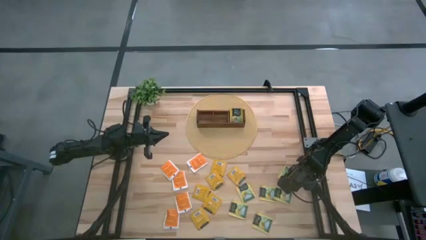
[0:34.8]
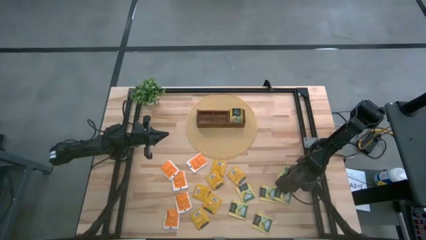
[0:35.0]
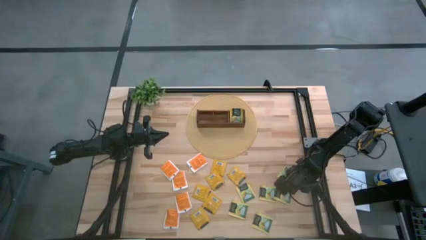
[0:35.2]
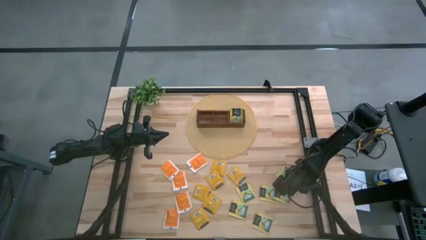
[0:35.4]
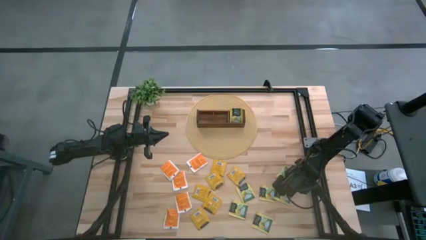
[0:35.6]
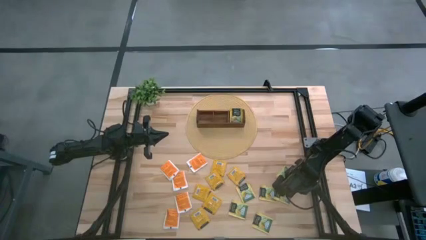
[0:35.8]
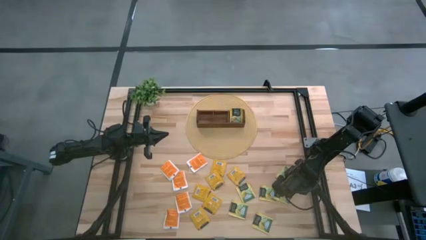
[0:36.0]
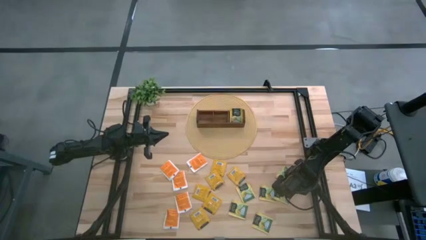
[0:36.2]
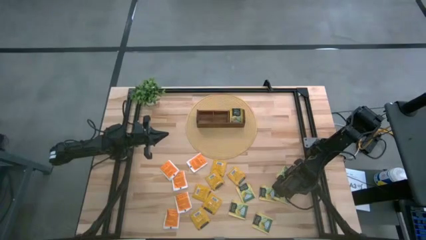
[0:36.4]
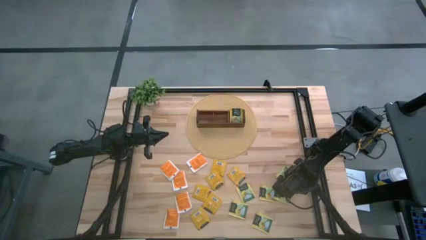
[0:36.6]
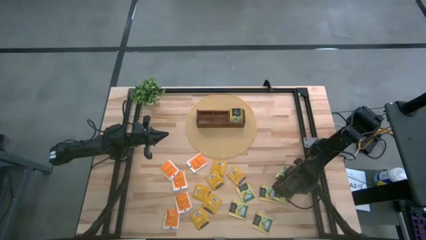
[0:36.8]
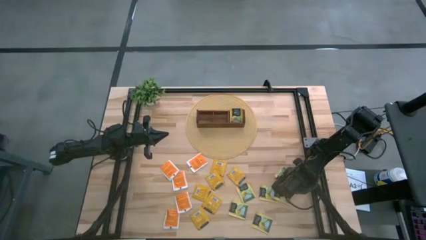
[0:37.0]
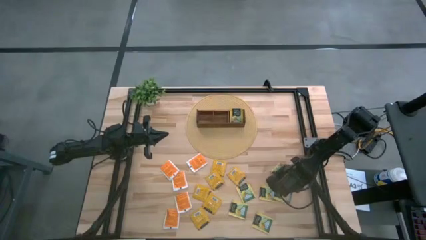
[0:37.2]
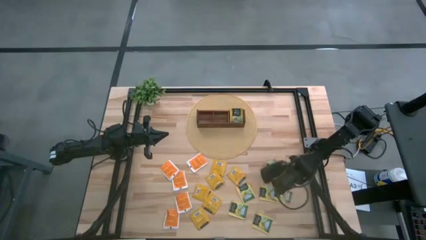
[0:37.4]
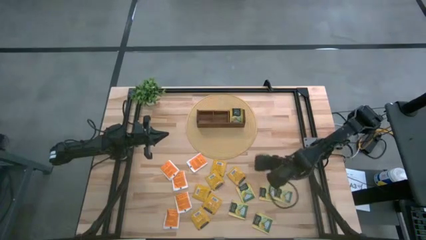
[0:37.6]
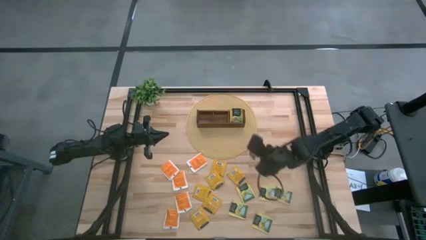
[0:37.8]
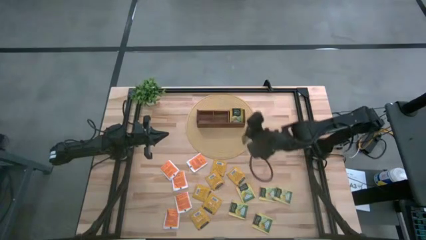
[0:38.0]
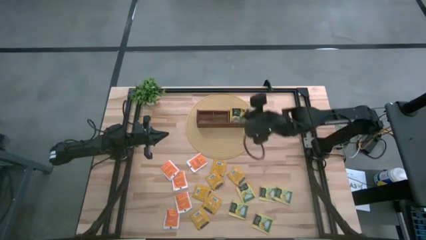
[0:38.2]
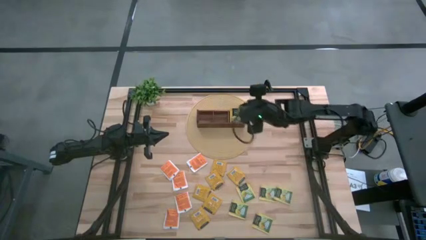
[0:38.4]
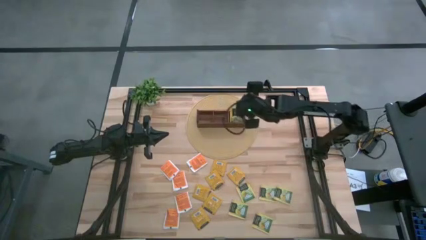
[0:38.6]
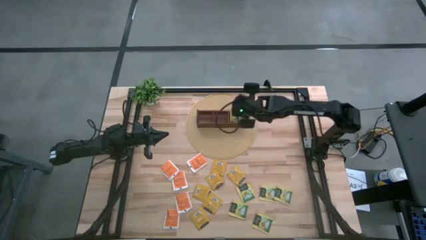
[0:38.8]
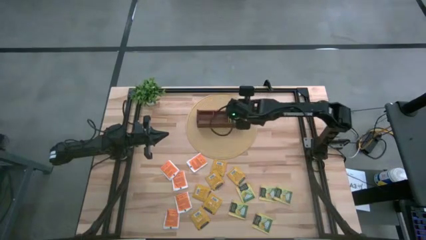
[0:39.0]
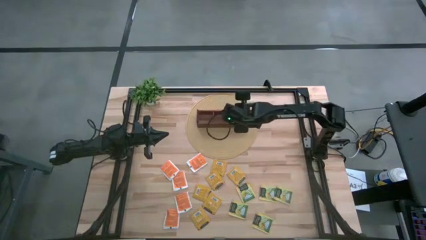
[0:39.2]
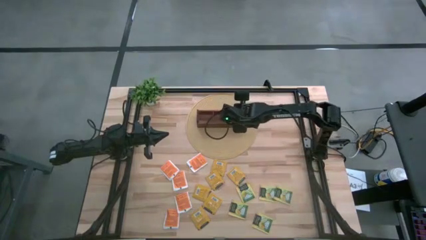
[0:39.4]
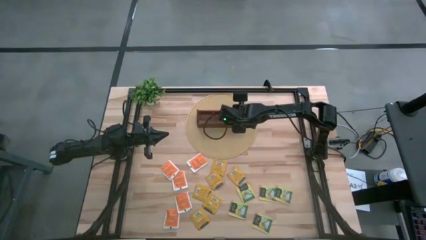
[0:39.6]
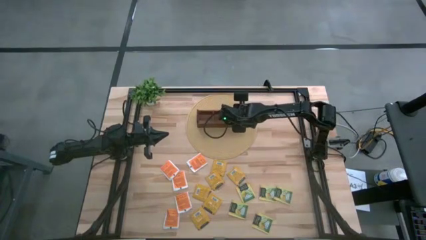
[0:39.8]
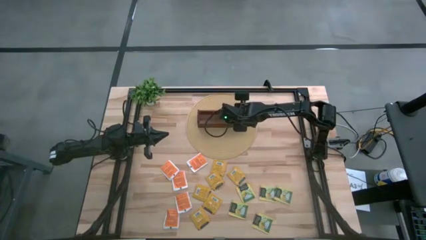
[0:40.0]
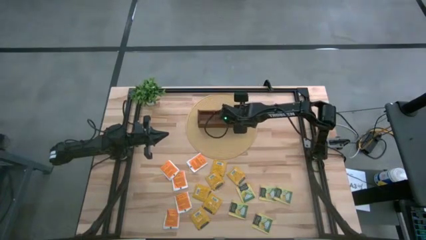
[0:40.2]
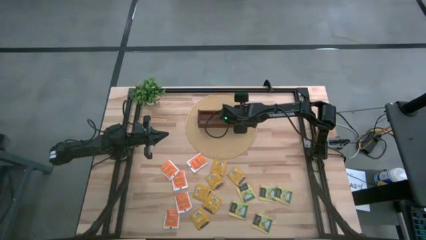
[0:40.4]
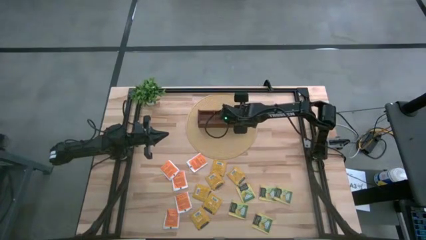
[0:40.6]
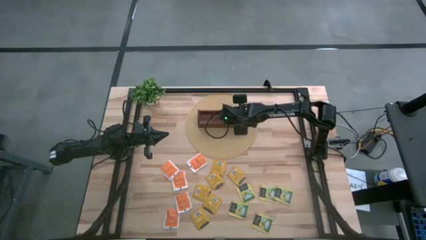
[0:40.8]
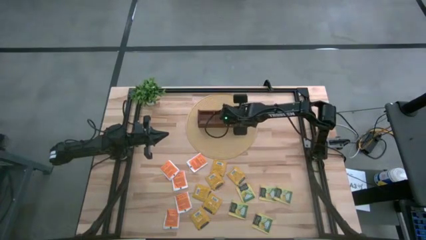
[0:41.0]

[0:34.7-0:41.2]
Task: Pick & Place Tea
Put the yellow tea bag into the right section of the wooden organizer

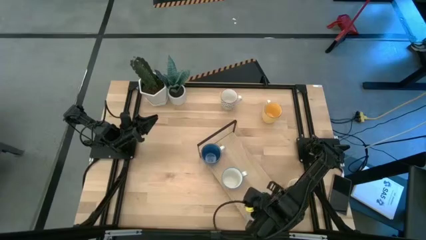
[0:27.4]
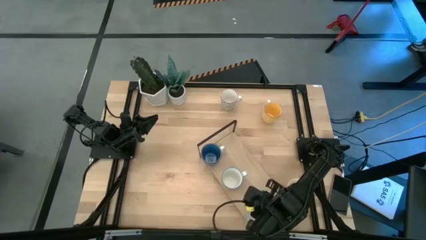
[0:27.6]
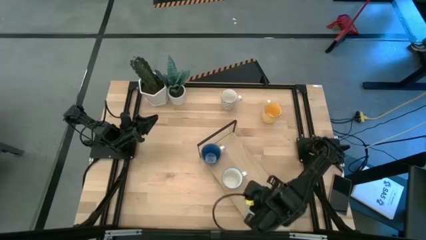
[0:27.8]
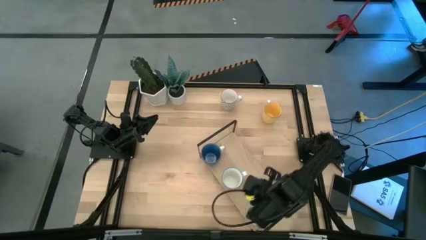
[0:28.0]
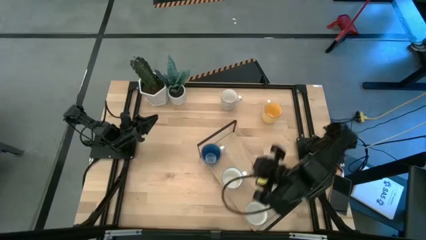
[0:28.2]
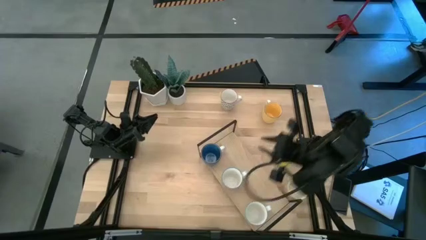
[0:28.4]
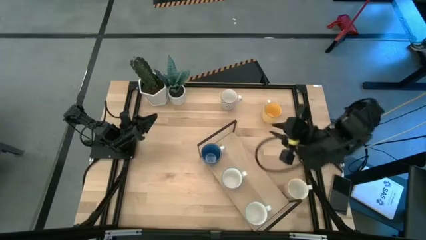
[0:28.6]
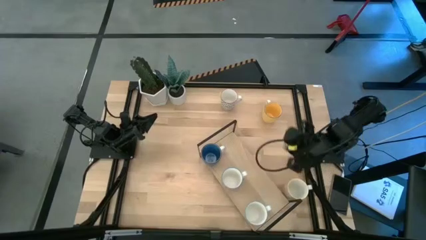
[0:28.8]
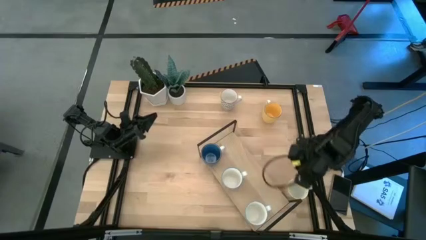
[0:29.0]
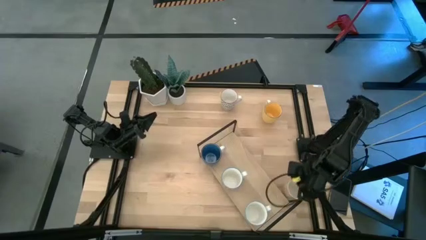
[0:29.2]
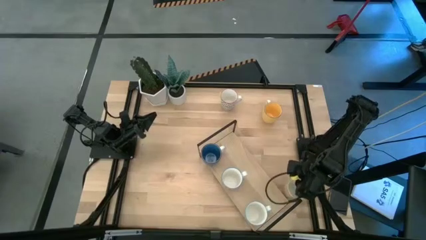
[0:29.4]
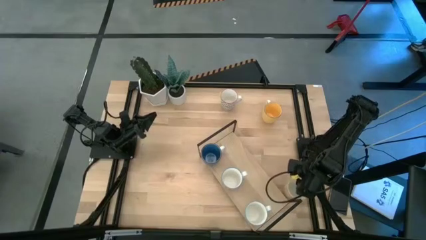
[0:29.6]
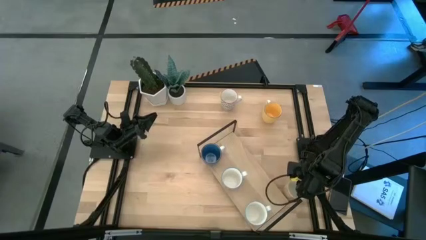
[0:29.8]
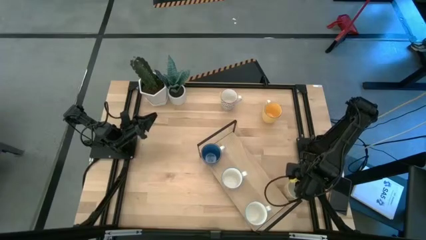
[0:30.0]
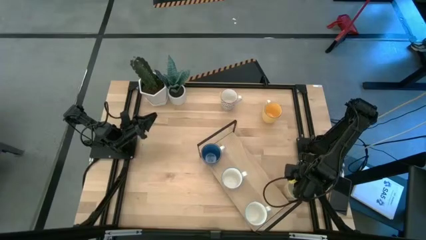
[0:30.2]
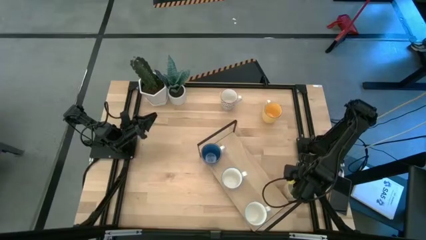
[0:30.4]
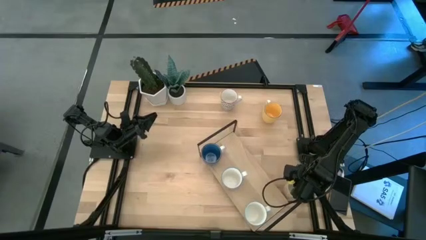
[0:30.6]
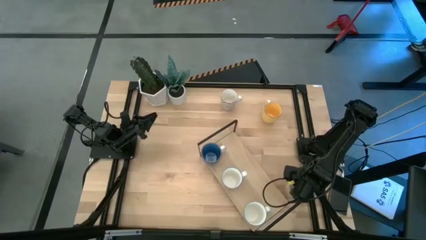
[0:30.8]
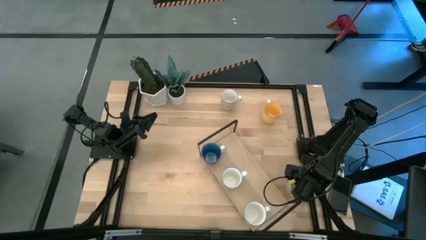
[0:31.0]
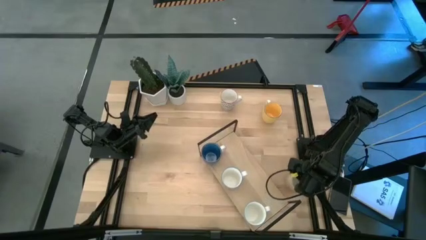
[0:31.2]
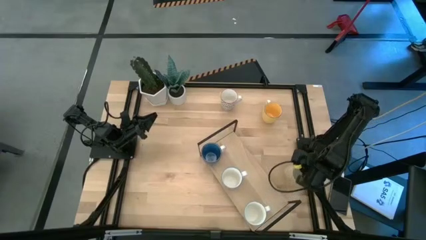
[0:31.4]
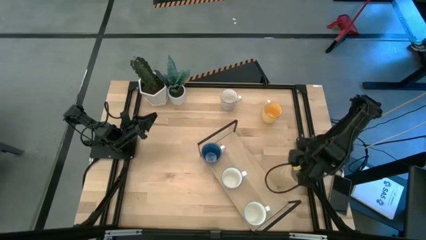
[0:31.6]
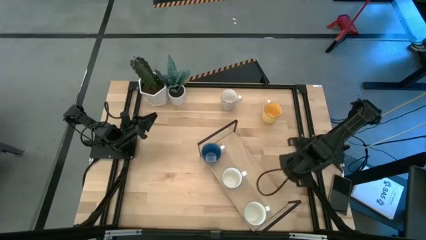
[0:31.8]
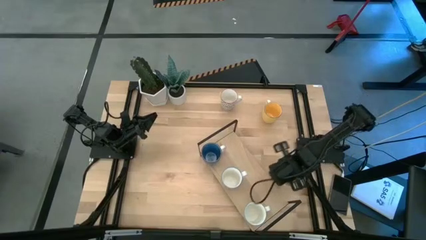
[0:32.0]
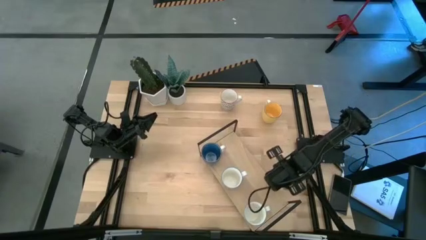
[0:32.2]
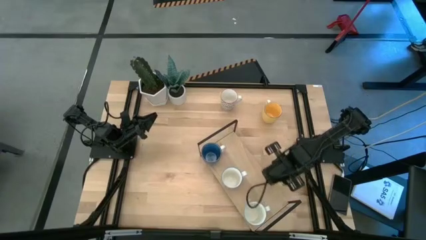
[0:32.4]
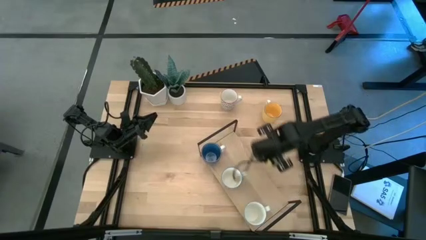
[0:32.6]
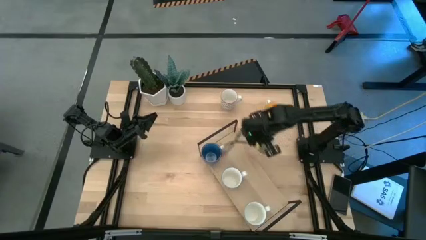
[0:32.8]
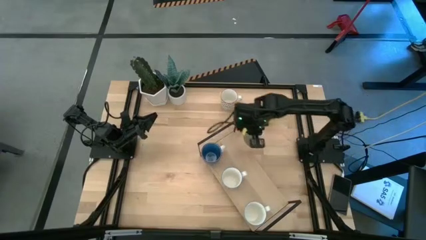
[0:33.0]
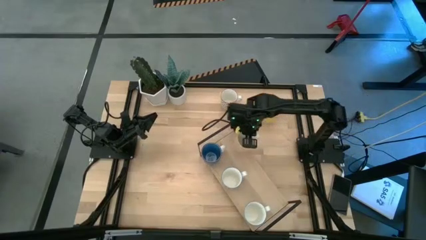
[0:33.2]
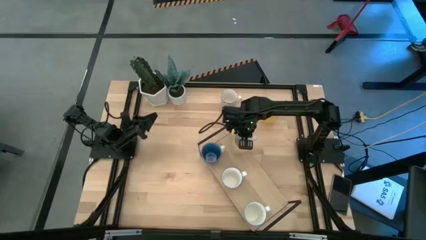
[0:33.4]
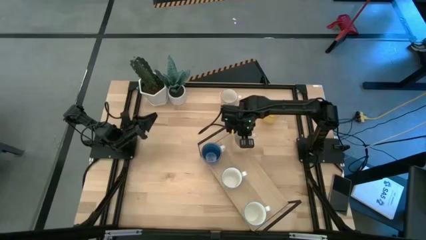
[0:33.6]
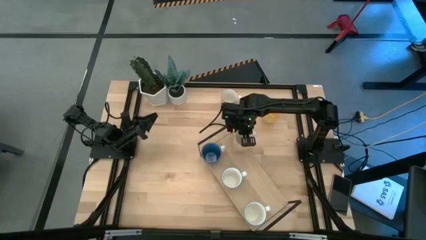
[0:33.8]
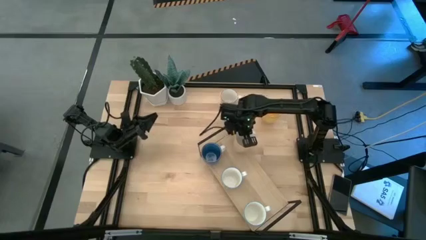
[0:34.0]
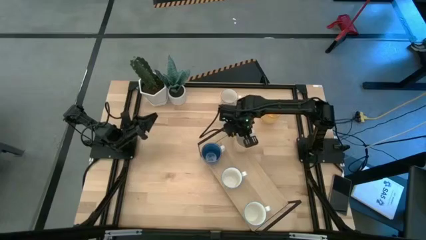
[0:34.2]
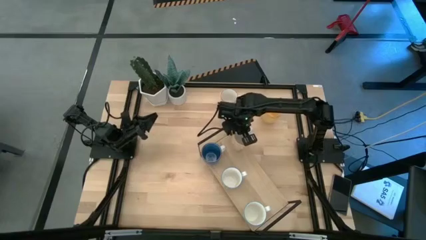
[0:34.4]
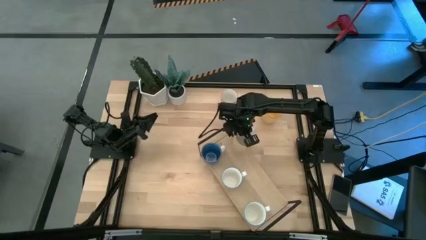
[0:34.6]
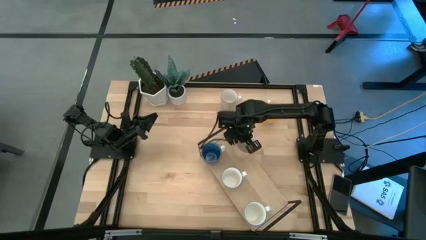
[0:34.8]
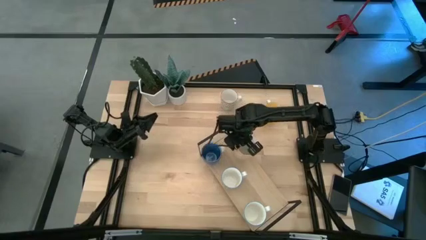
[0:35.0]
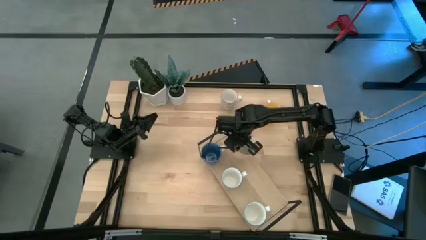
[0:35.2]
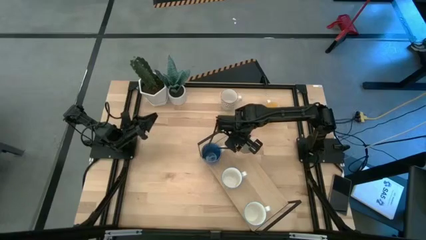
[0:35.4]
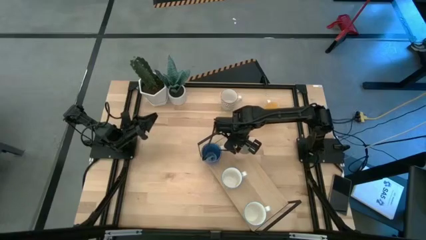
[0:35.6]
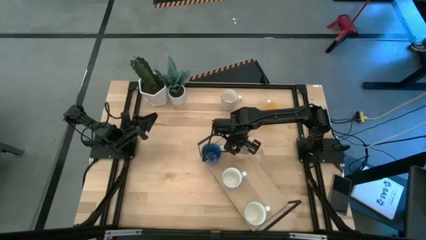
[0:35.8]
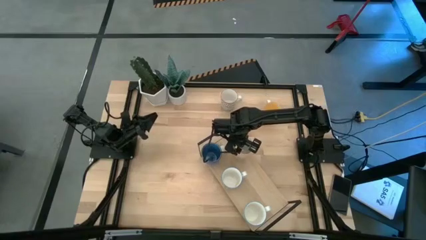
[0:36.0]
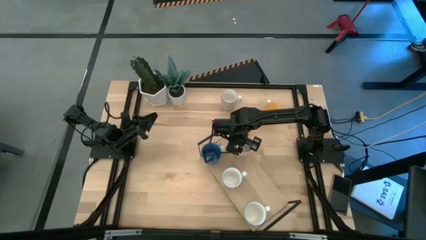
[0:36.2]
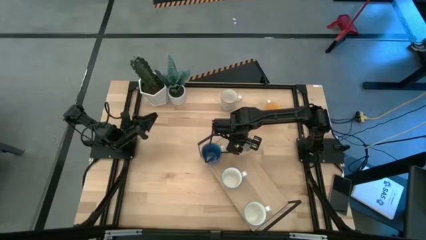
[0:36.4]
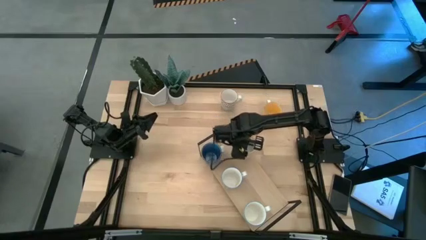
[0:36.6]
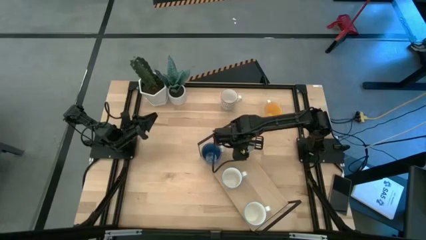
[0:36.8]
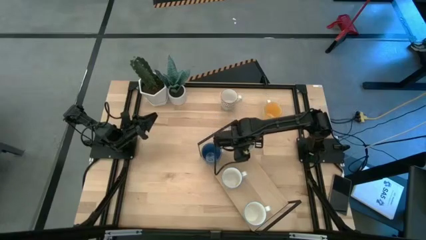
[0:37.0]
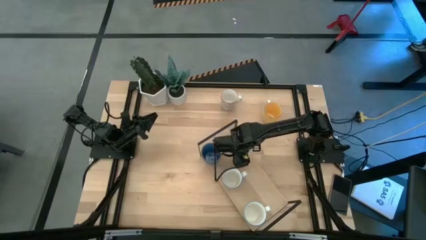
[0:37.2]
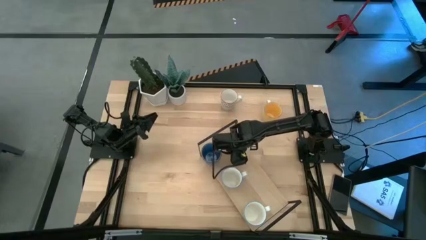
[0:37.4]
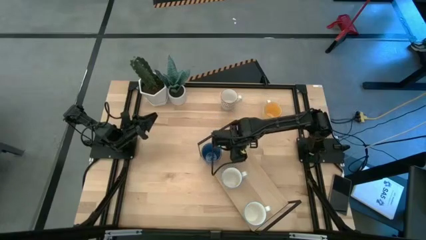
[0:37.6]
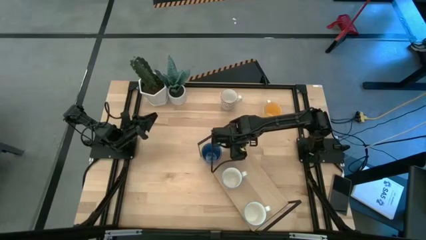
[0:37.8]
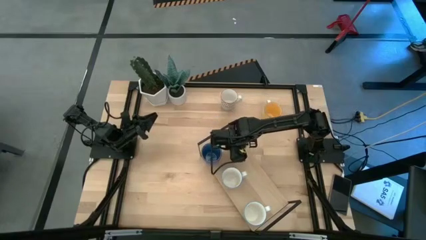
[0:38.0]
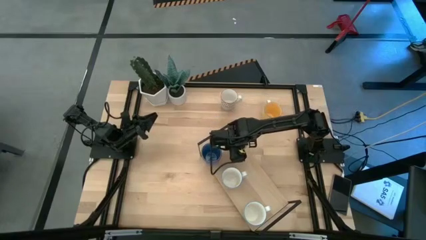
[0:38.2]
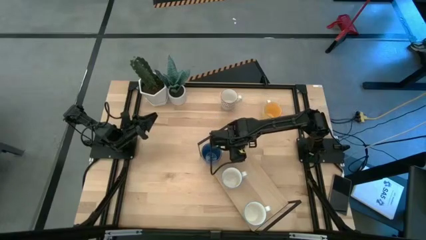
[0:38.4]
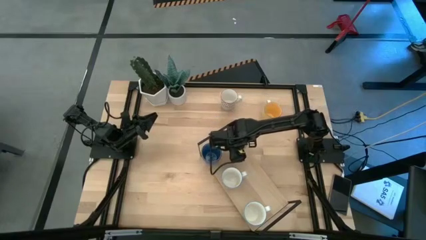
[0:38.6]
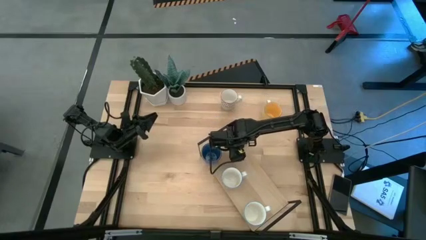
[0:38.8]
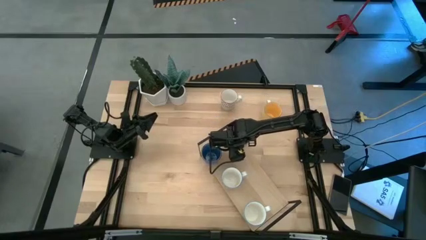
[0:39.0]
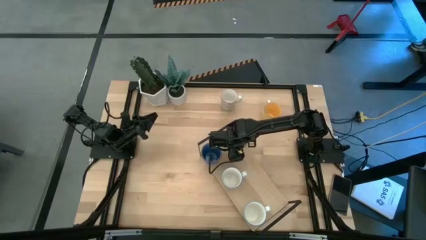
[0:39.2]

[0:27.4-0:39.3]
Task: Place coffee mugs
Put the orange patterned mug on the shelf
